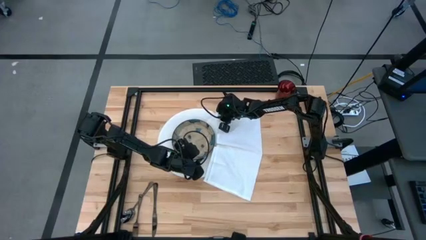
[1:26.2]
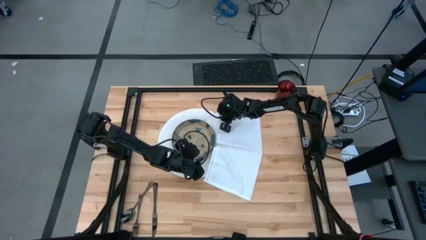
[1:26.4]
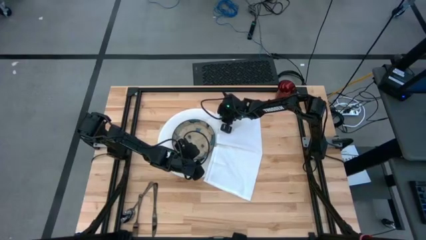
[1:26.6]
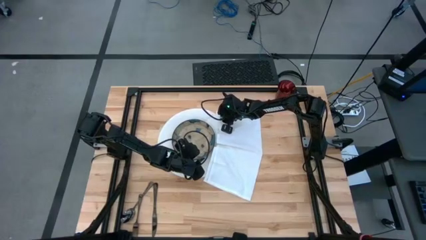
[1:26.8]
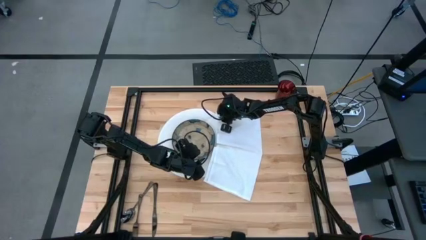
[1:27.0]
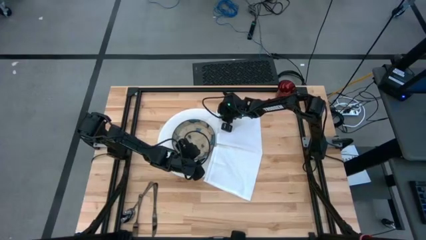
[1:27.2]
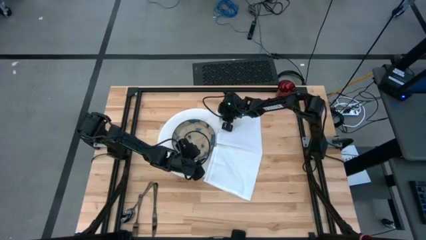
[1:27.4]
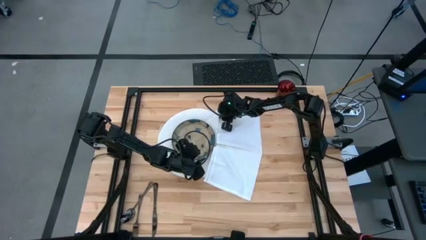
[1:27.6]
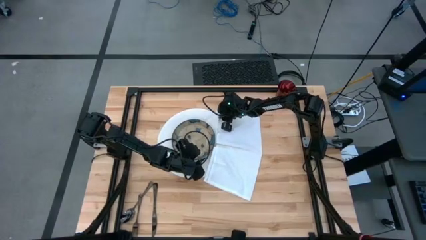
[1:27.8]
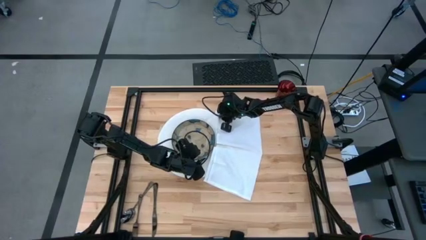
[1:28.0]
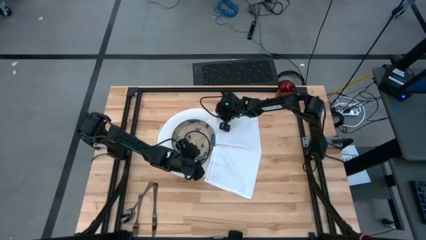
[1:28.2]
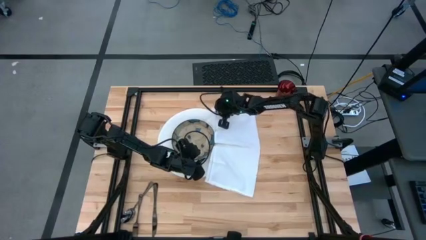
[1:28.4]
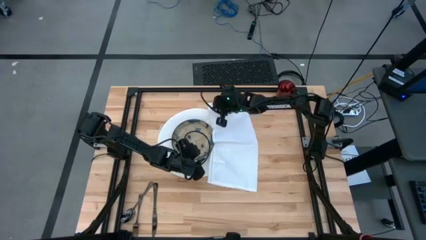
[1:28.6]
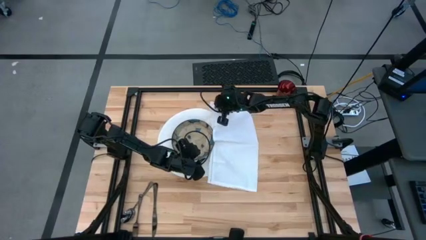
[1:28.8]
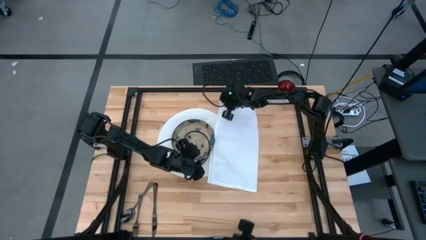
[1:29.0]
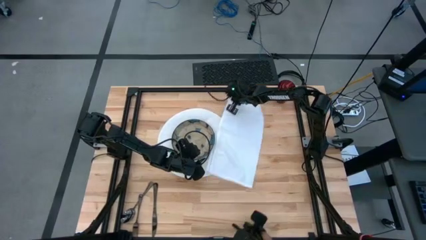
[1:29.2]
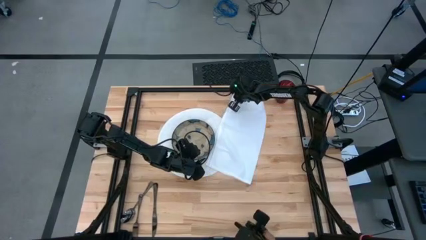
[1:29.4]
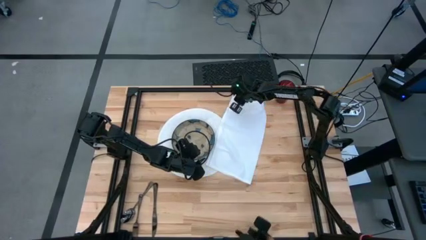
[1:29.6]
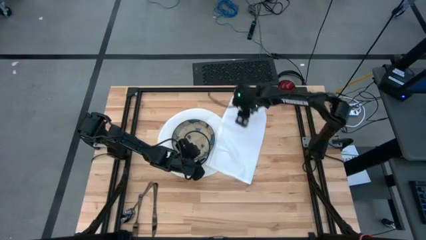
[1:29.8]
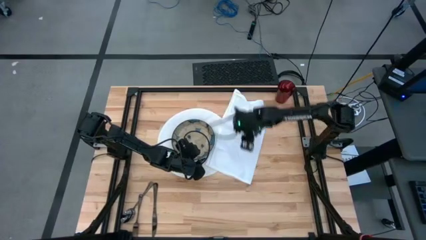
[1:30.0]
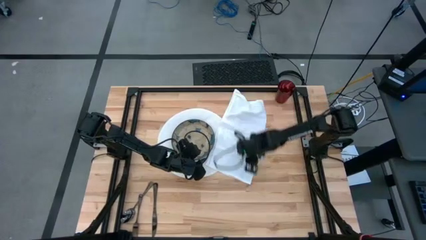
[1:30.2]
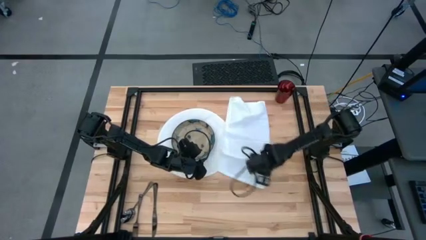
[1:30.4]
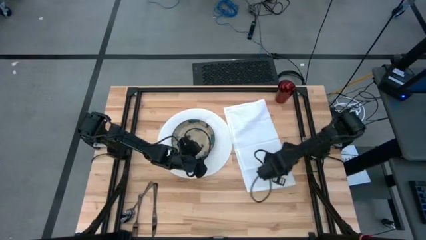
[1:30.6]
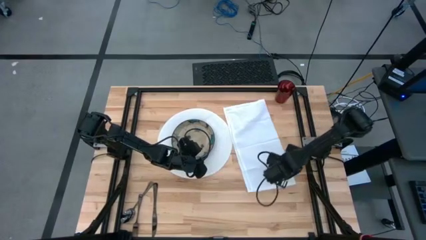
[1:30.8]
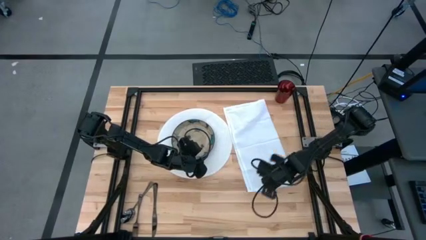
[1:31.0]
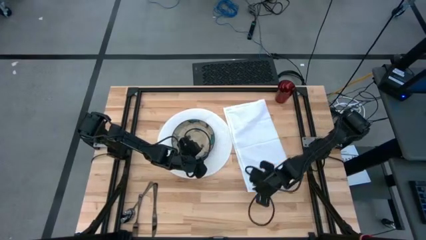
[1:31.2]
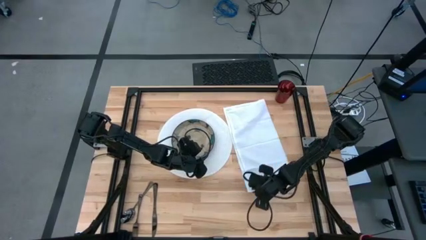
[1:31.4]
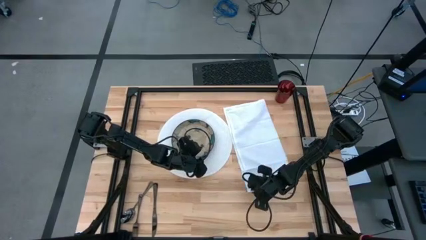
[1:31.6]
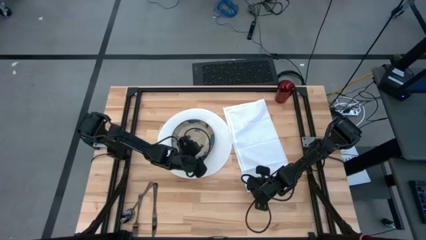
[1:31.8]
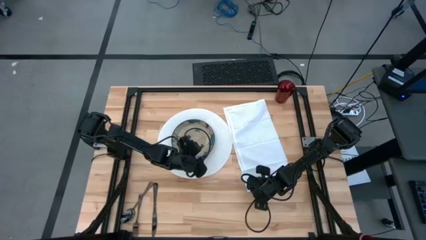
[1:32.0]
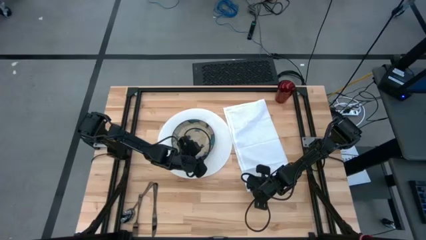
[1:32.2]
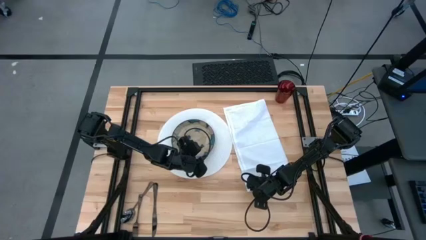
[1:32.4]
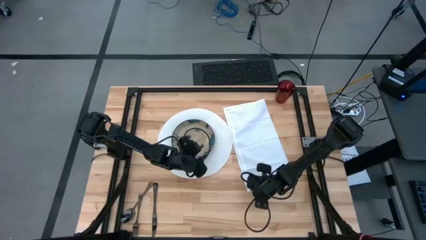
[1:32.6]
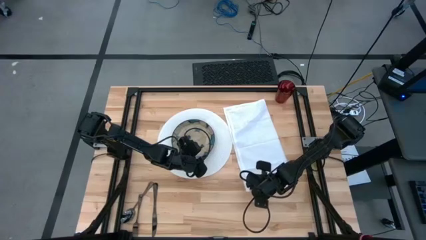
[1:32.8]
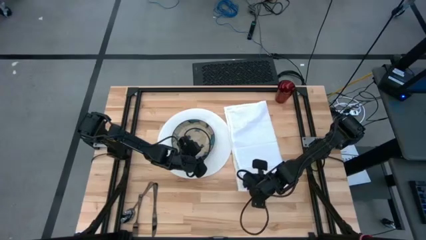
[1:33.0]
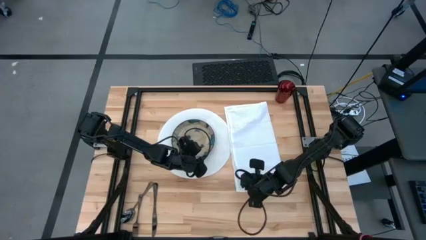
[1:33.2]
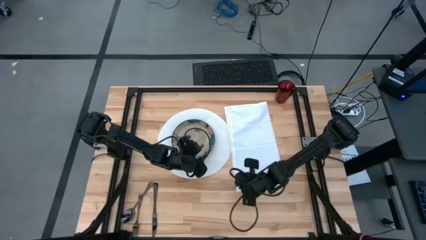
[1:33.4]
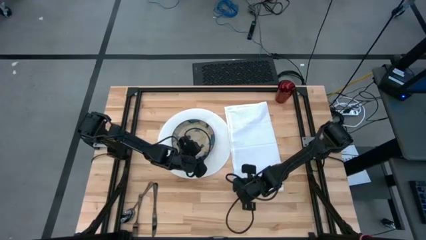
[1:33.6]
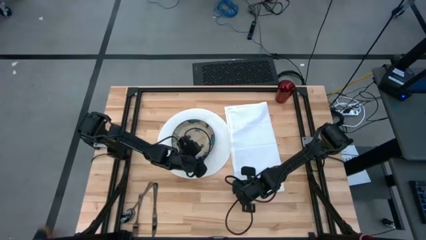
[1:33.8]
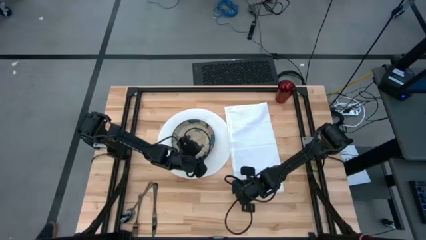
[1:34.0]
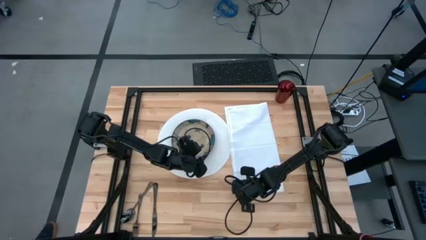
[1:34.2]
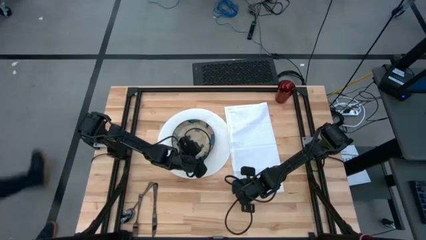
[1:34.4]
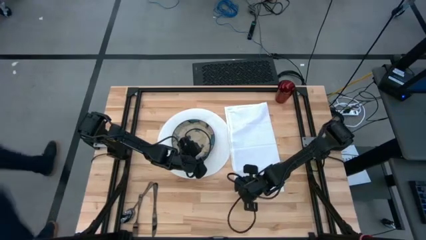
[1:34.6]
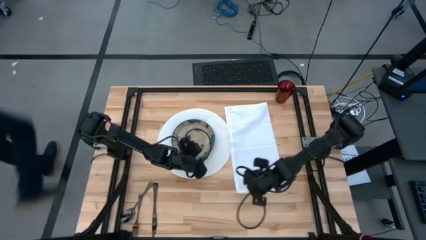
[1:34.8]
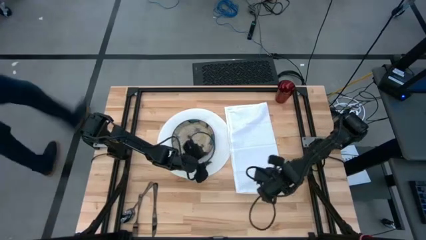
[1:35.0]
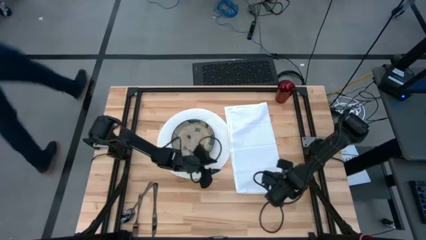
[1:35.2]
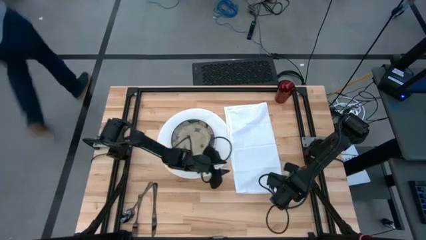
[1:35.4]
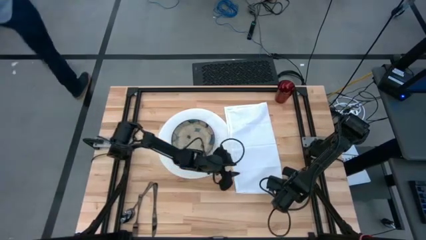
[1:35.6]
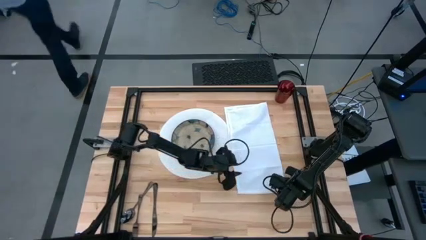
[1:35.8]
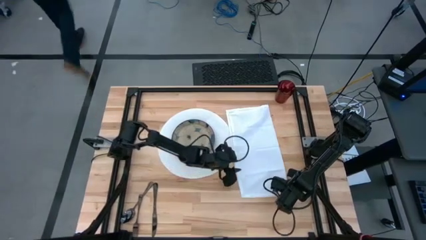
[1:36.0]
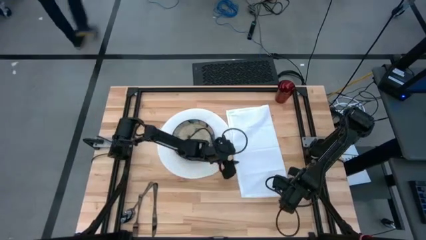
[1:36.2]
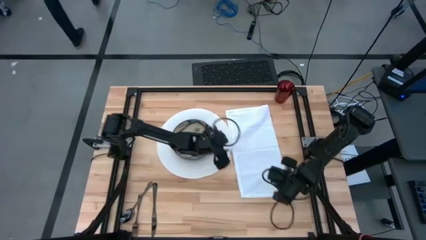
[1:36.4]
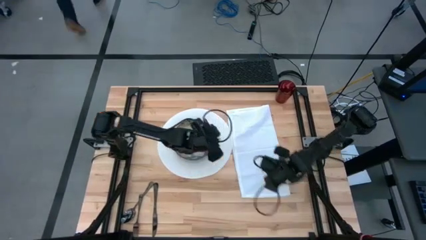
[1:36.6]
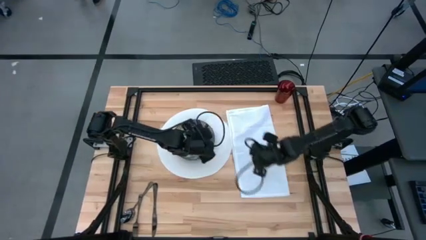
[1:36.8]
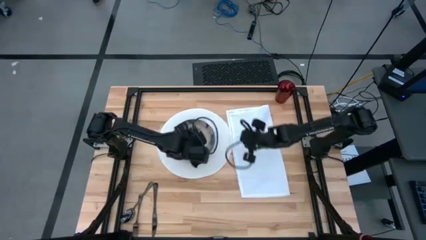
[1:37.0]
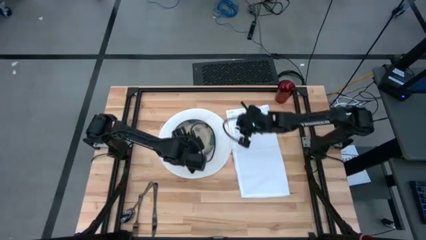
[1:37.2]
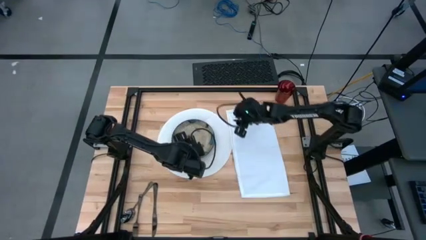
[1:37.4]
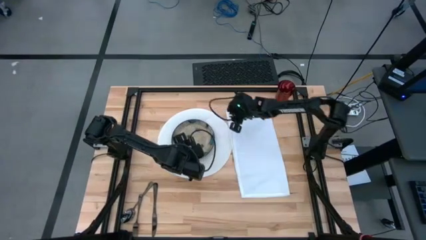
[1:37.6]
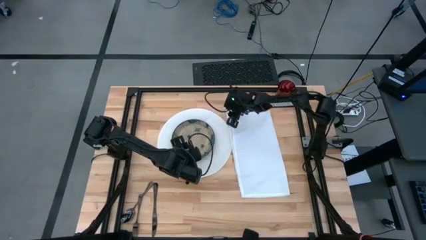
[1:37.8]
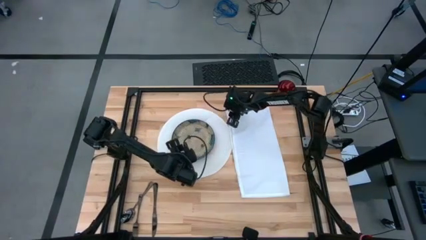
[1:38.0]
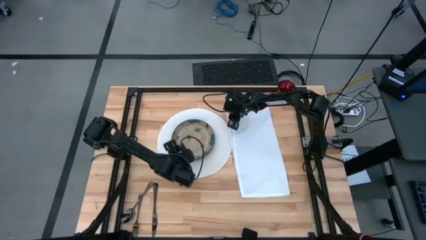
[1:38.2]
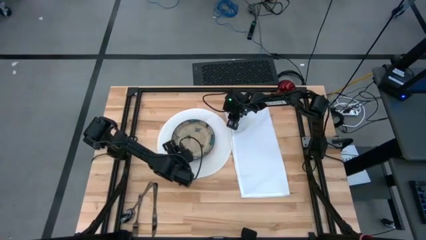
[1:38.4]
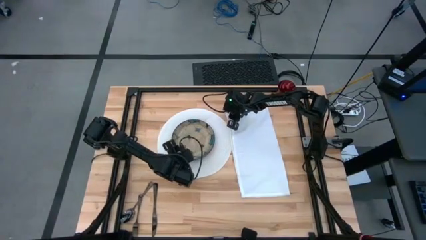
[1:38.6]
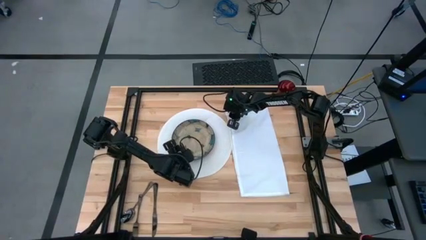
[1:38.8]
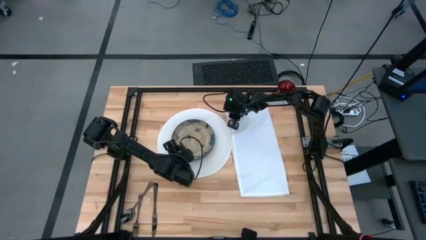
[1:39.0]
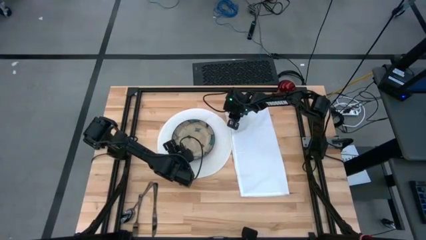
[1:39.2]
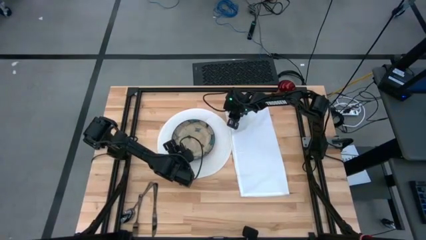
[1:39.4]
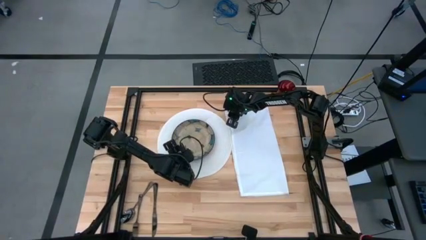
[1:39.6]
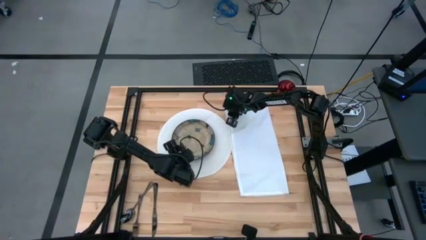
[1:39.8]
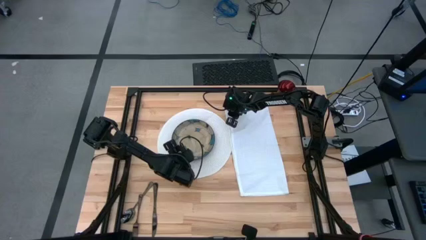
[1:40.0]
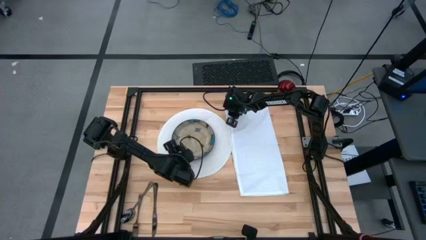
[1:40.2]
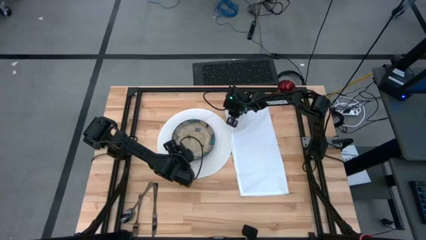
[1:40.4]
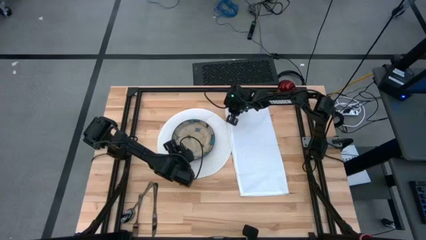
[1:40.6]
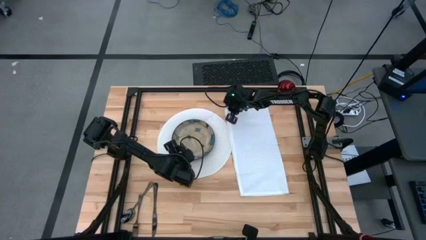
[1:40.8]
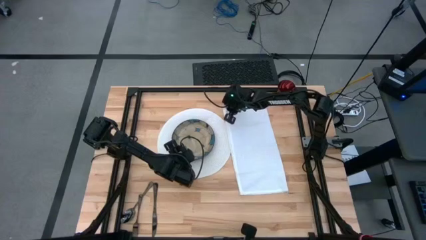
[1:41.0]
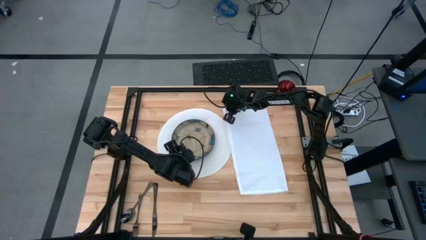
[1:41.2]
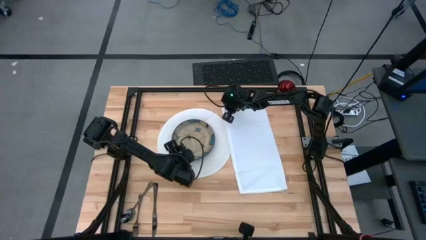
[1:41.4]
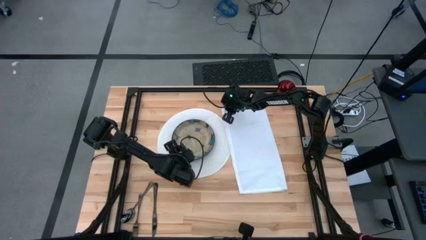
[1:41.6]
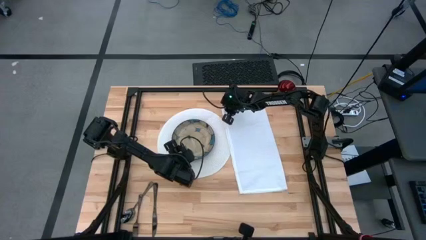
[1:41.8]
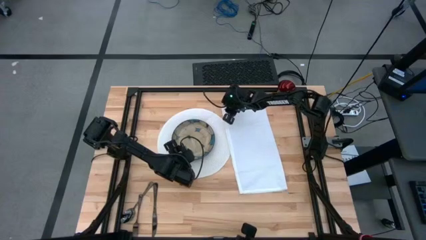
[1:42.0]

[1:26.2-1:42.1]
Task: Set table place
Fold the white napkin
